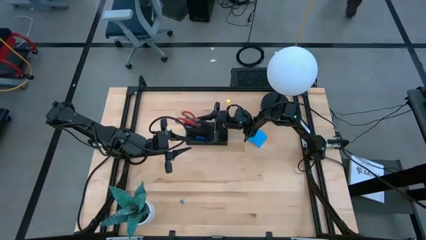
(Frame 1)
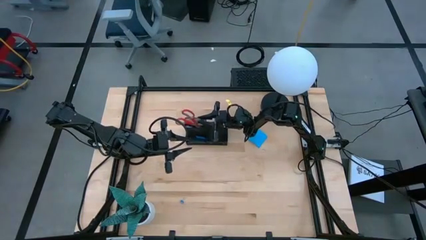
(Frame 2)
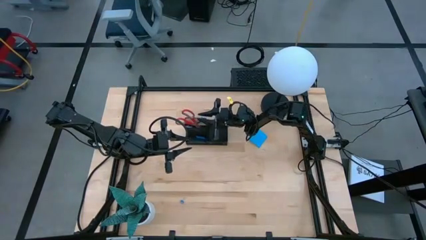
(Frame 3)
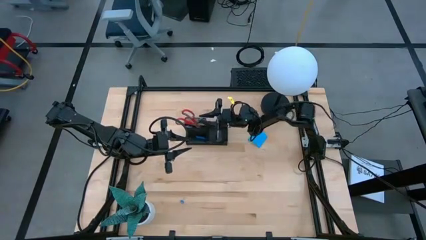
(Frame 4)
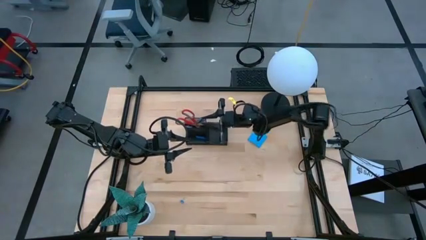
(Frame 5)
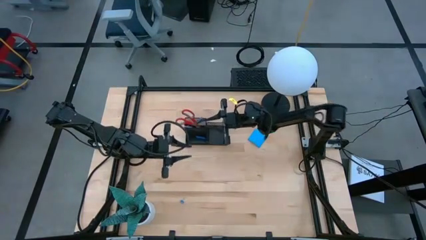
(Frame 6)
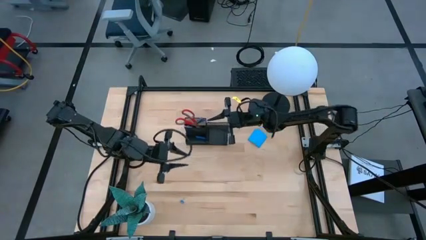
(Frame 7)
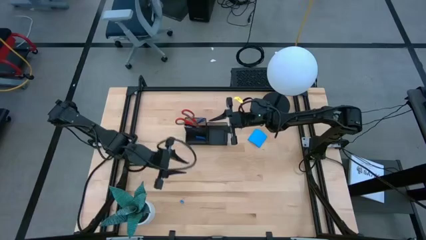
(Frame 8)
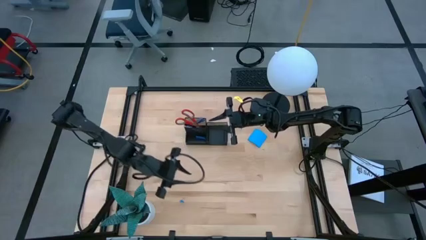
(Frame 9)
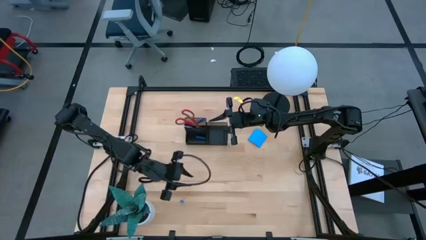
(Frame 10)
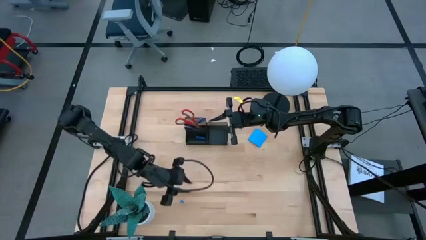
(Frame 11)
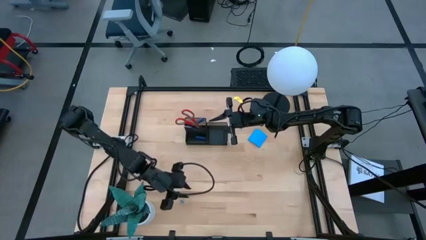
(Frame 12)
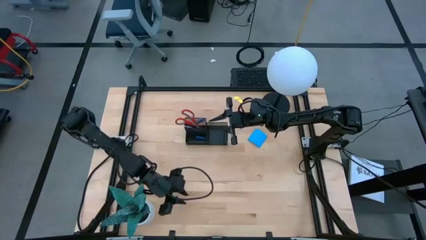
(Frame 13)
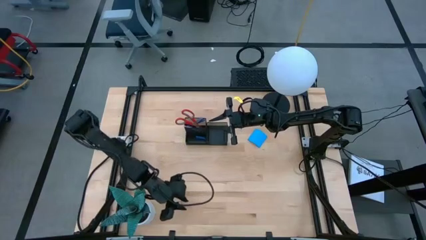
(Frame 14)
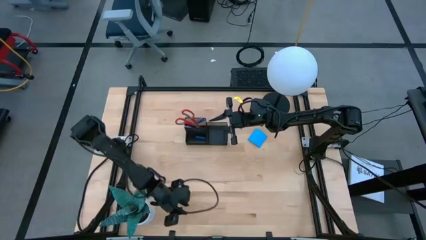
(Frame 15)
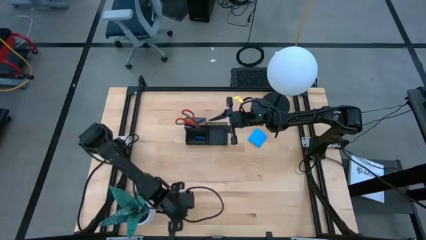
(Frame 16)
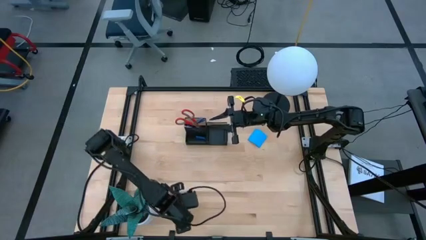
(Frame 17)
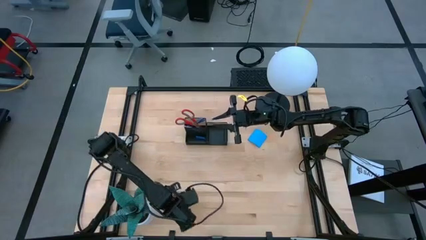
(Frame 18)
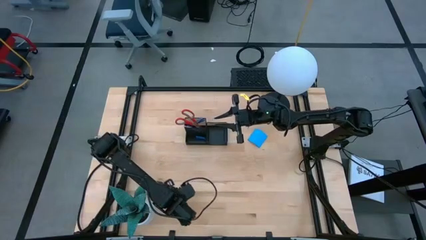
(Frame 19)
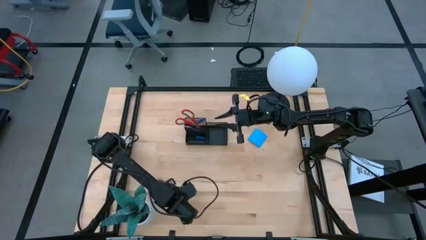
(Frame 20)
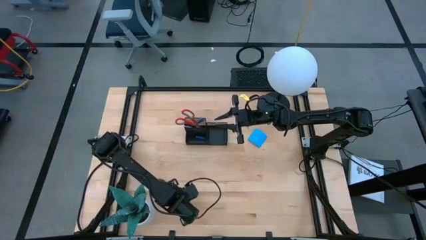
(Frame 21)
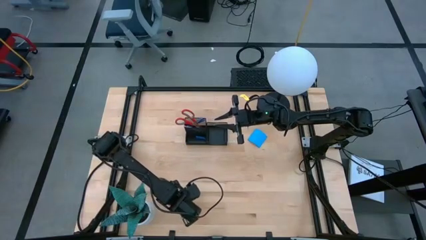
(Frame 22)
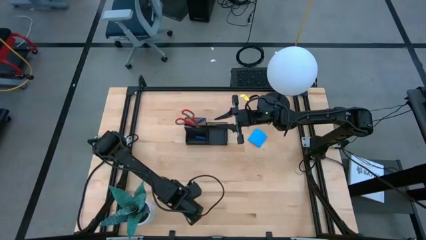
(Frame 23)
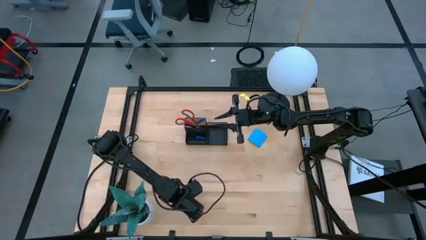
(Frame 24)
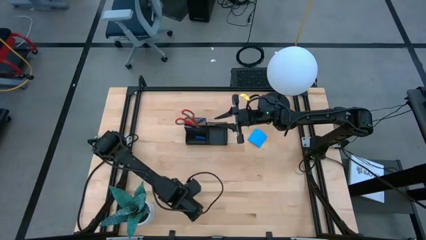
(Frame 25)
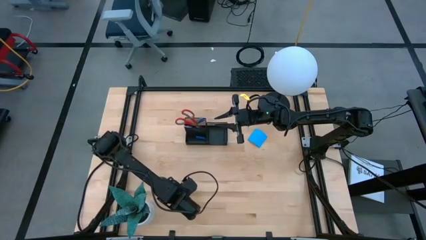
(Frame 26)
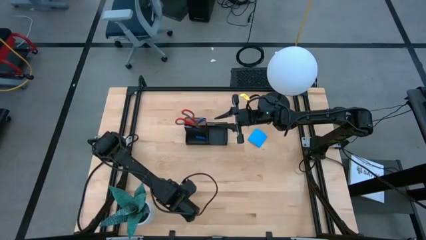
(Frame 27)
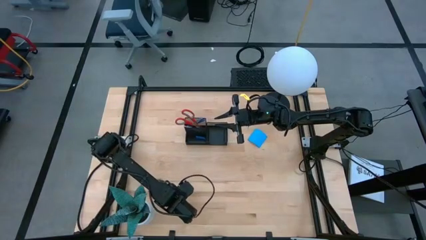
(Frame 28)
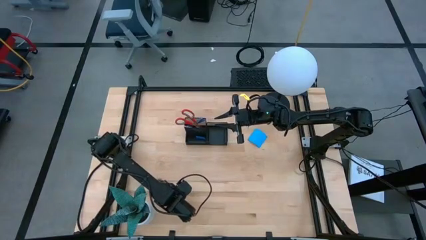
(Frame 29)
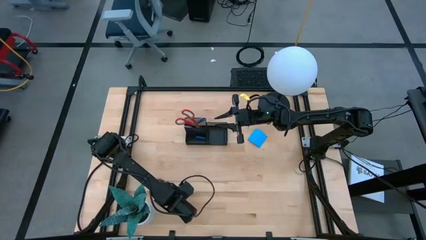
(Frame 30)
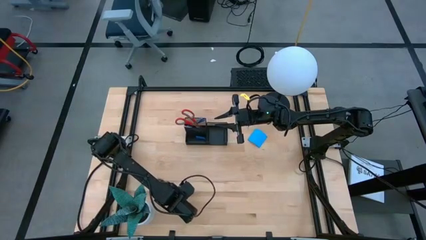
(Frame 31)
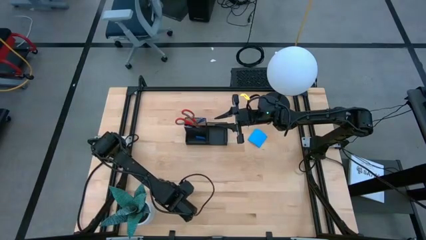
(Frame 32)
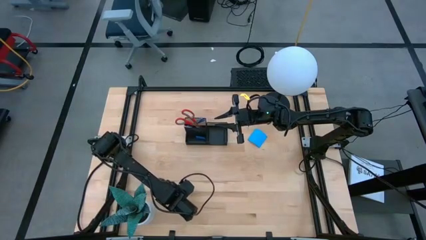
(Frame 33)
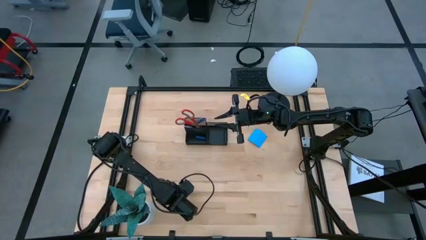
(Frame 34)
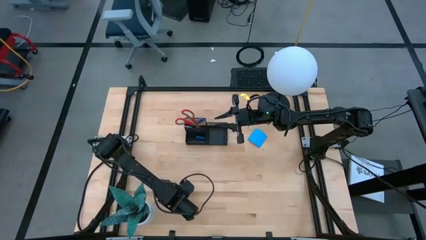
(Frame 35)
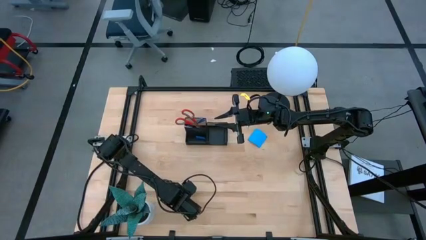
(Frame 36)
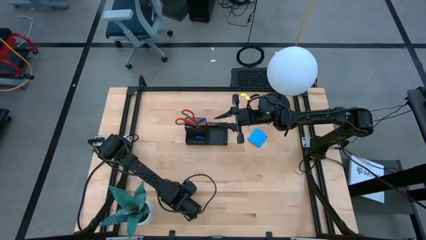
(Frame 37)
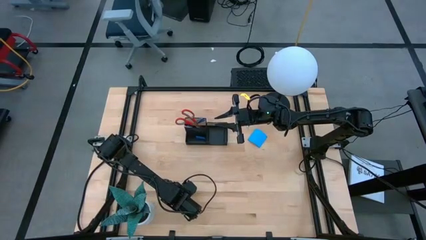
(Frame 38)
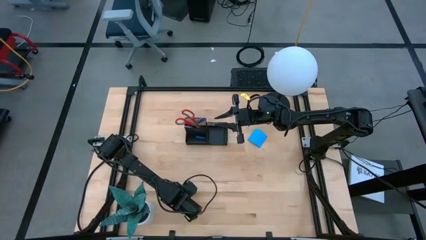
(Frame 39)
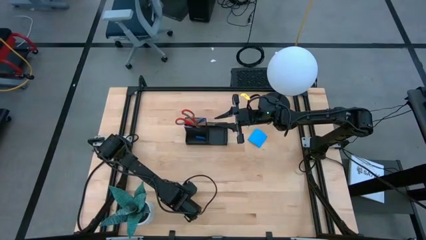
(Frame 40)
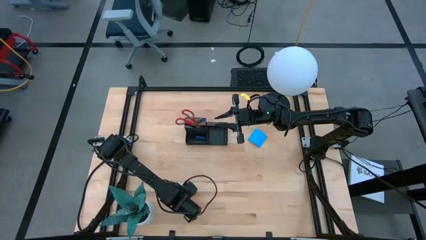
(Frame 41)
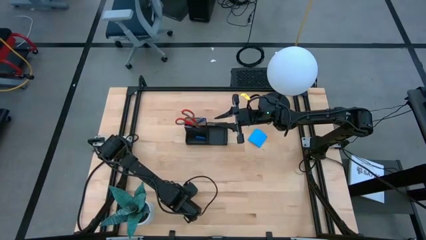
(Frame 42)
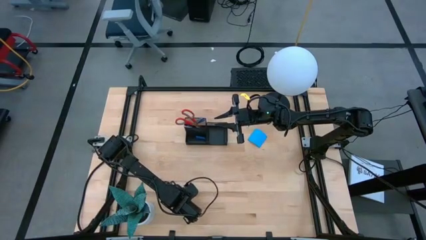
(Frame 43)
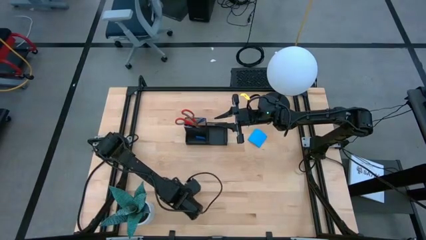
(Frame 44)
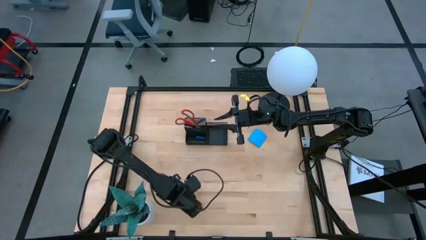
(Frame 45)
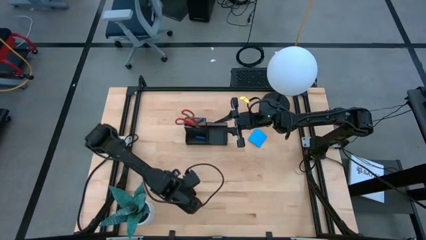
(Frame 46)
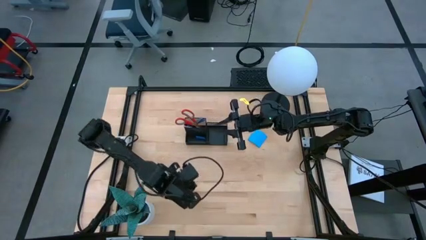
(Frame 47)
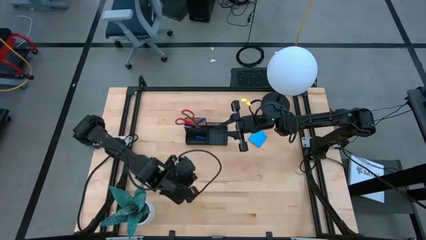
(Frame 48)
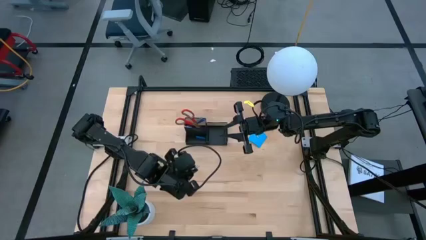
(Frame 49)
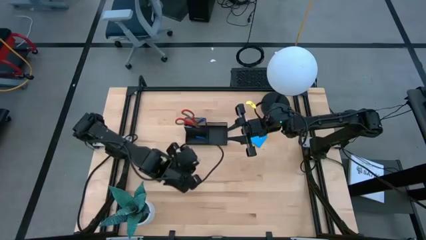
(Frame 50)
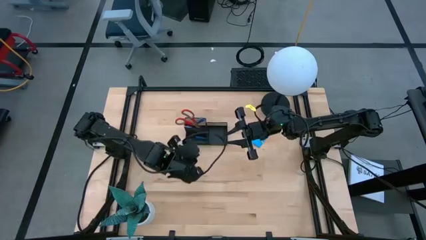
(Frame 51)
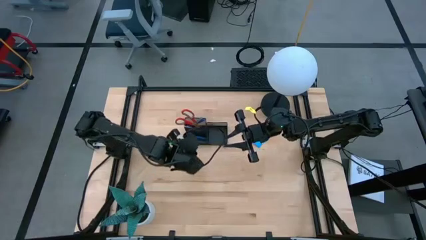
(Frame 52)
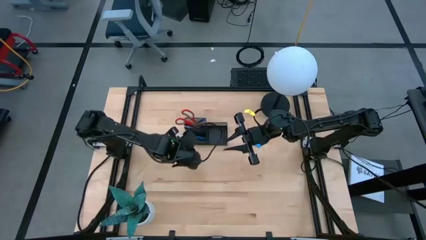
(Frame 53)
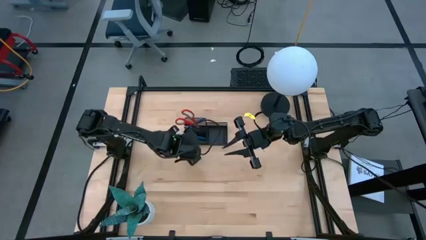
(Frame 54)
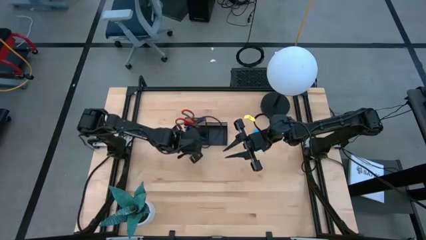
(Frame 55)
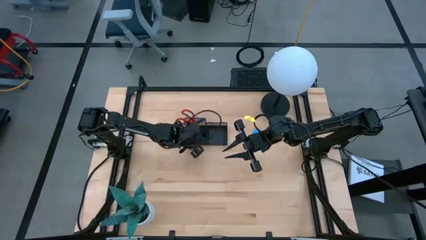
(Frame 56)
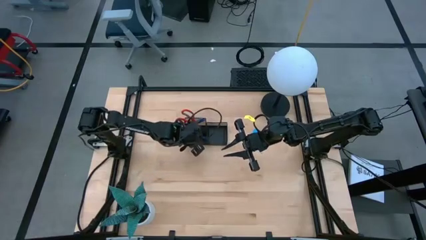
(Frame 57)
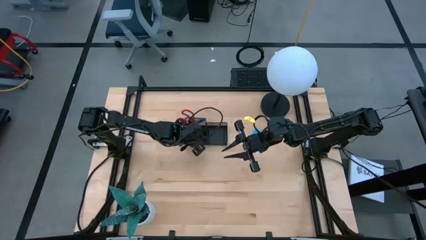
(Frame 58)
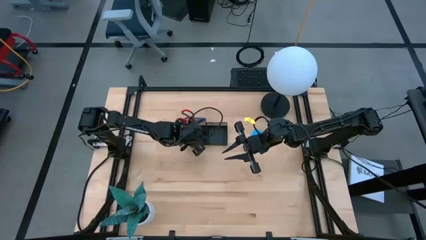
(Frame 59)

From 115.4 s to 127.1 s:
Task: Pick and place office supplies into organizer
Put the blue binder clip into the desk organizer

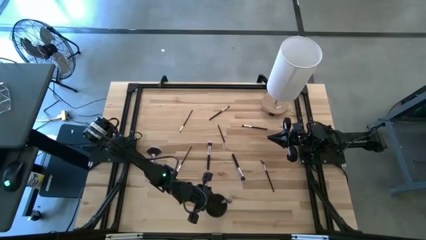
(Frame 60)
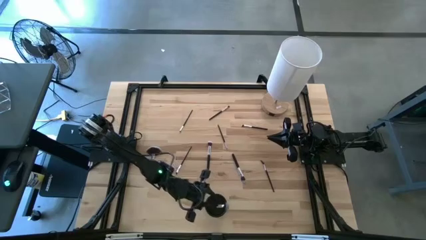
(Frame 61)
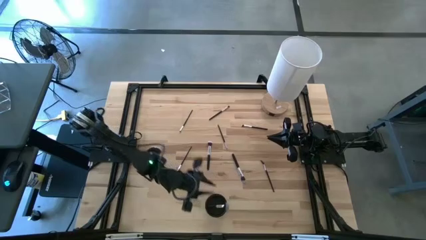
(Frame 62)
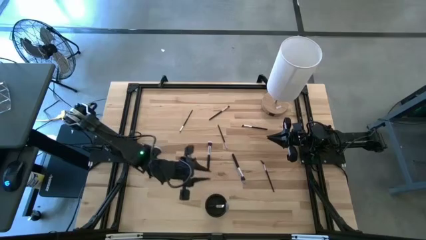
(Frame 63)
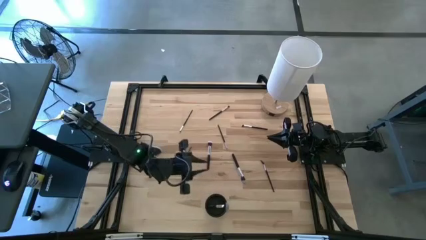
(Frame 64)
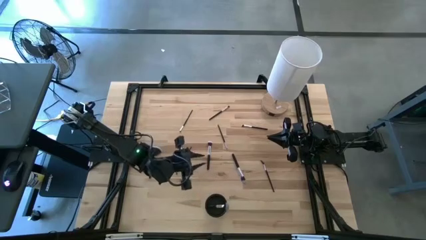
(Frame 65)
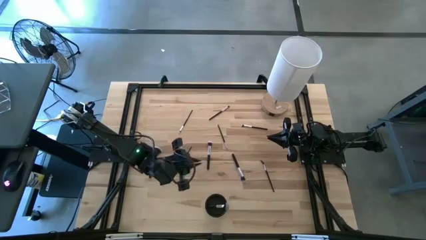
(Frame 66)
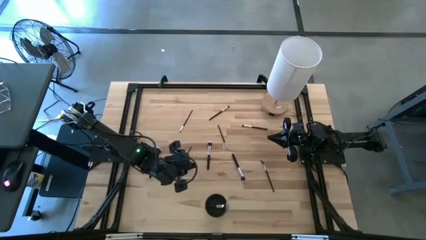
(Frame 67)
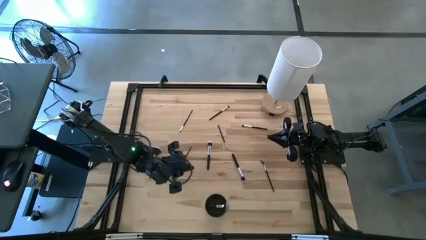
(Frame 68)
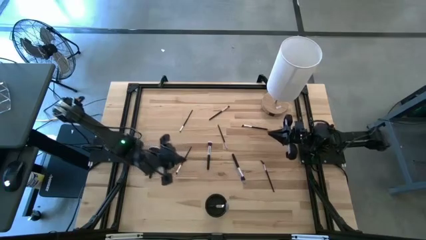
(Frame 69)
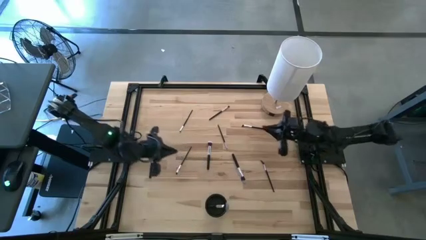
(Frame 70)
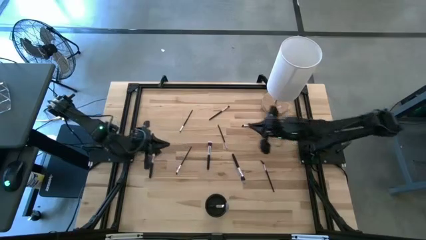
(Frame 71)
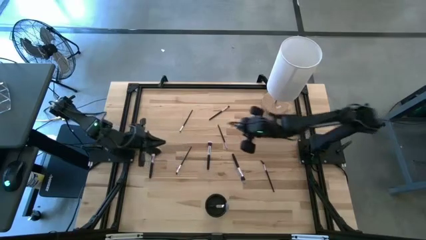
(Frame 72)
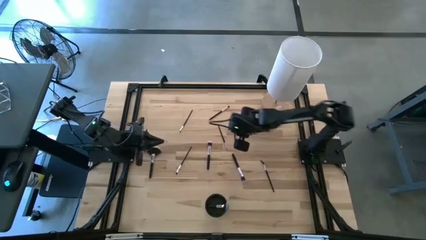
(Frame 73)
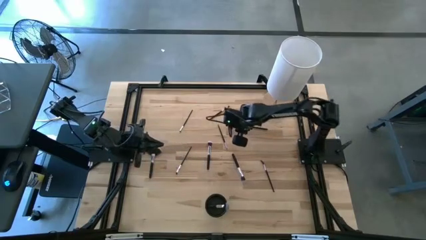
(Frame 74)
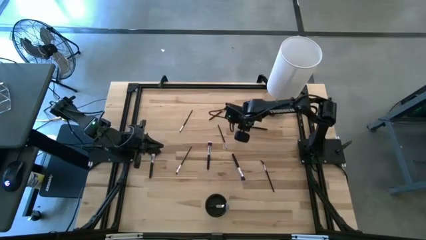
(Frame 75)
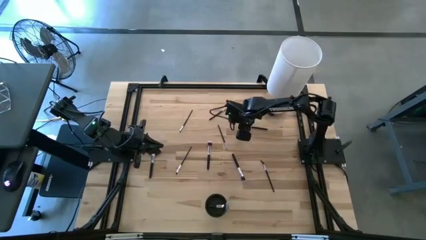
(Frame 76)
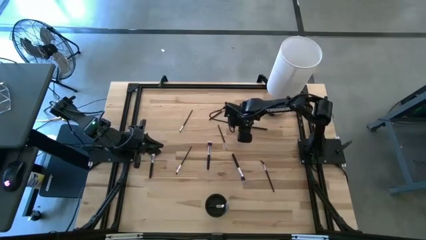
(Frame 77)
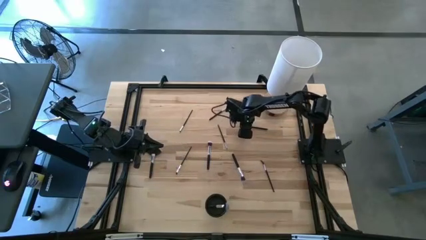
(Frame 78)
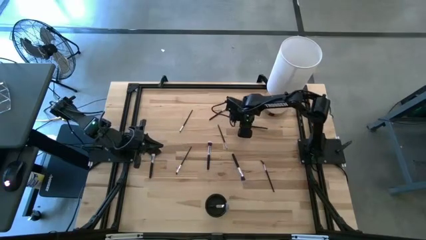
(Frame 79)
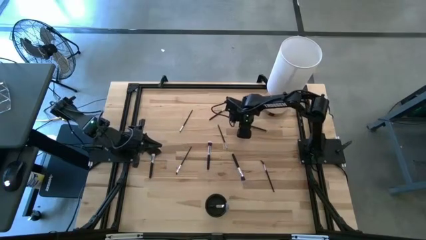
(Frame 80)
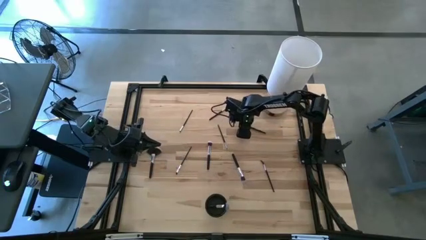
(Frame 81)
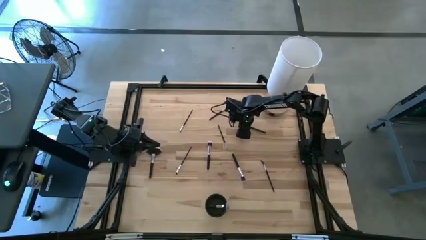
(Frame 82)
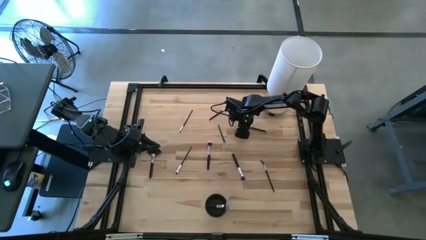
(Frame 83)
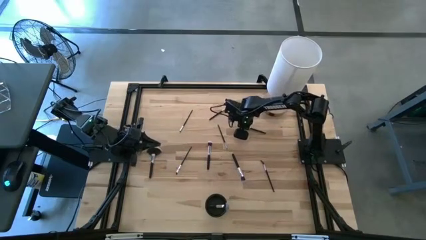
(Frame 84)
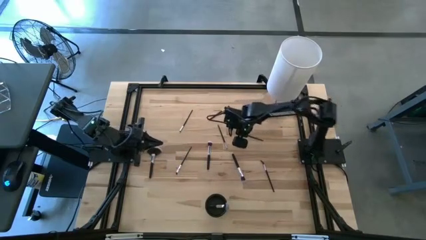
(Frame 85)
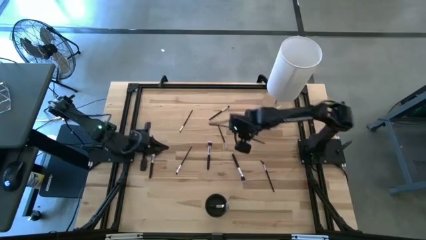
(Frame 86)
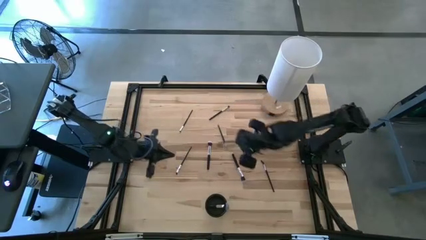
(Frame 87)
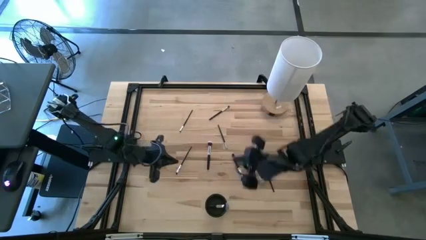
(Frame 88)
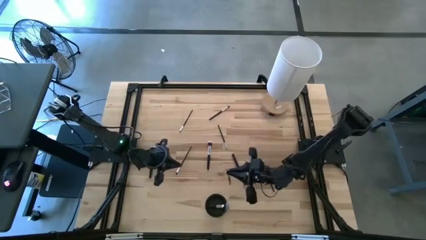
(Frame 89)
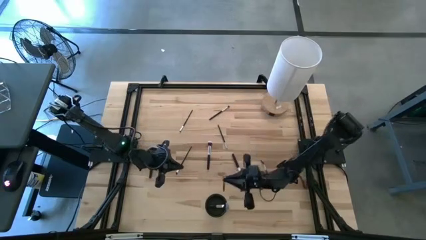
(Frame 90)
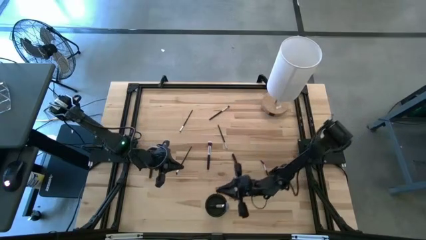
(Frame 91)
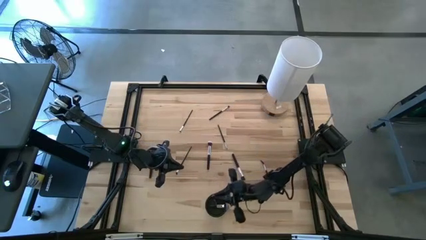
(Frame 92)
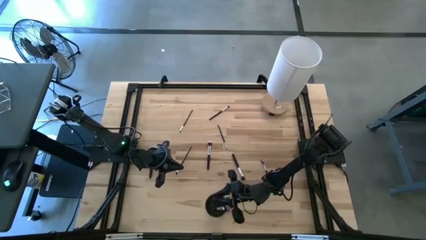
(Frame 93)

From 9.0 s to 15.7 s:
Task: Put items in baskets/containers
Put the black eyeshadow brush into the black pen holder
